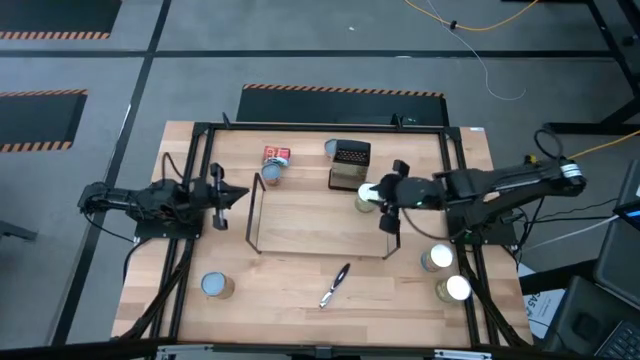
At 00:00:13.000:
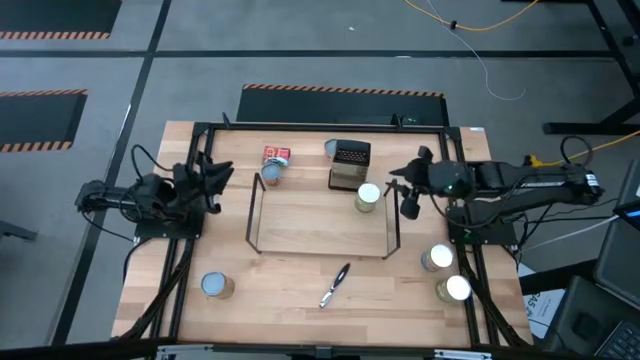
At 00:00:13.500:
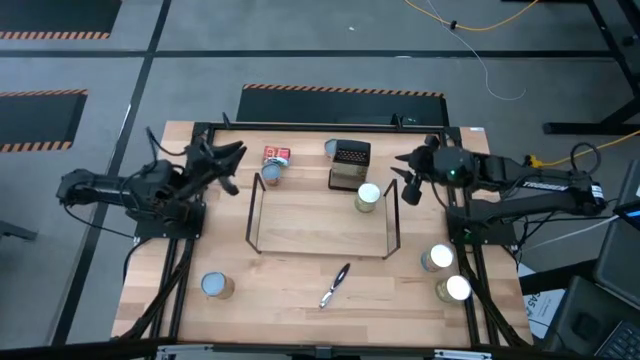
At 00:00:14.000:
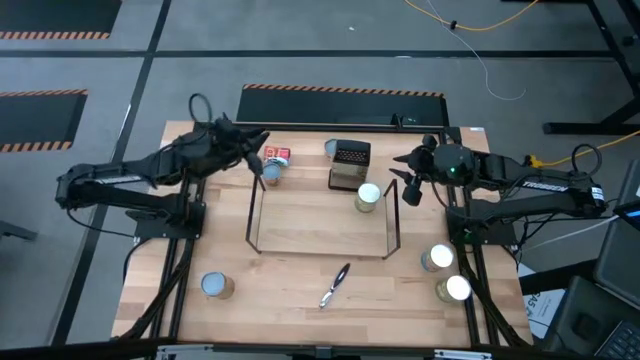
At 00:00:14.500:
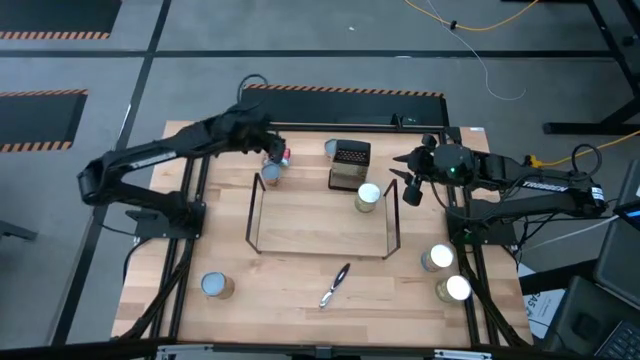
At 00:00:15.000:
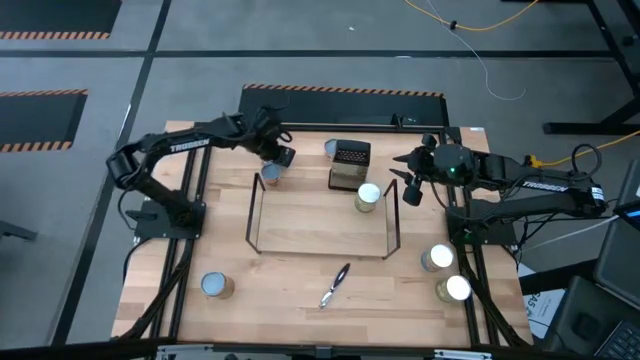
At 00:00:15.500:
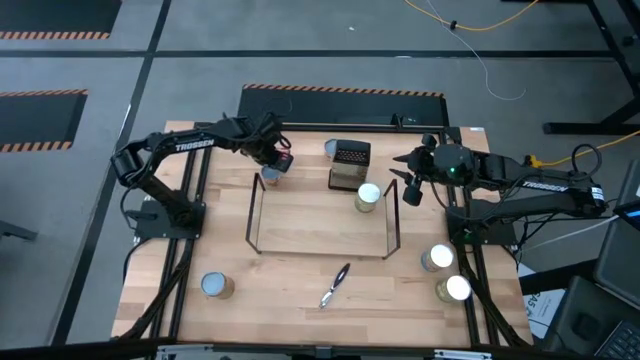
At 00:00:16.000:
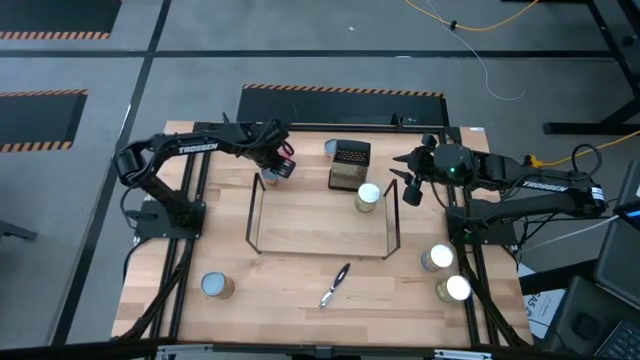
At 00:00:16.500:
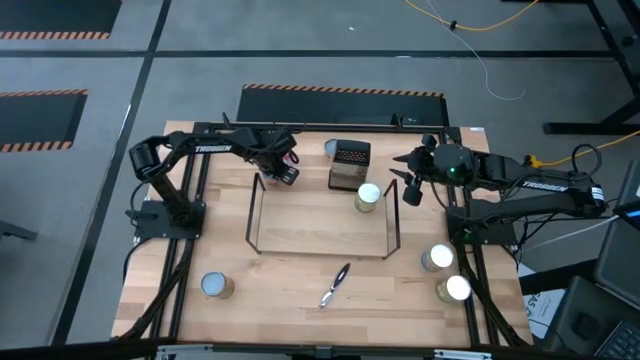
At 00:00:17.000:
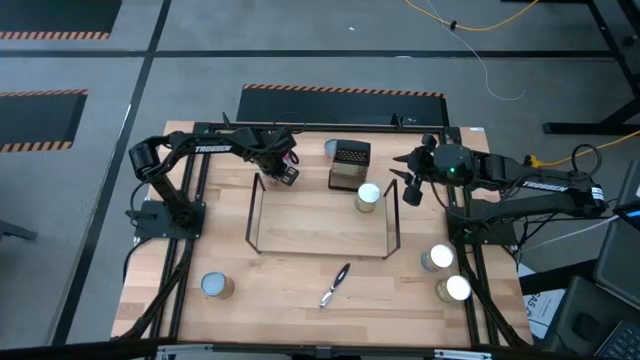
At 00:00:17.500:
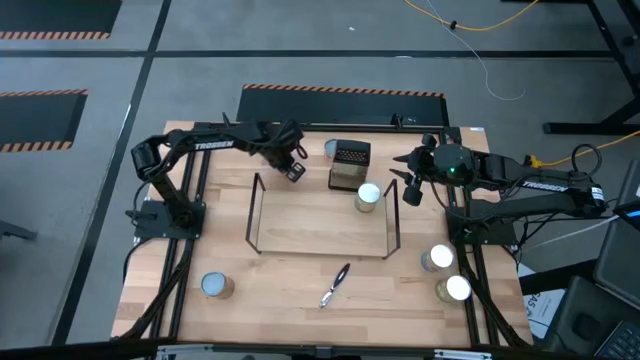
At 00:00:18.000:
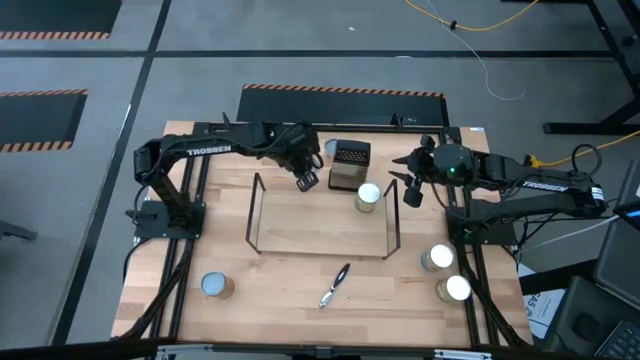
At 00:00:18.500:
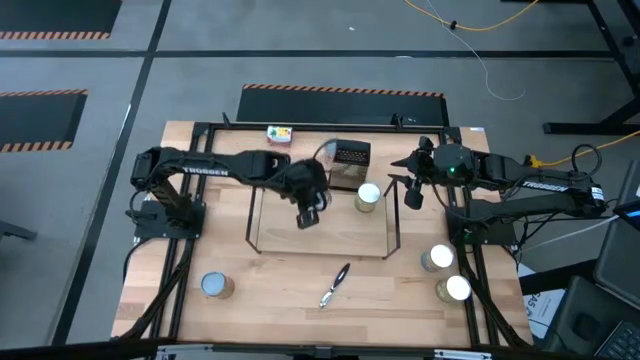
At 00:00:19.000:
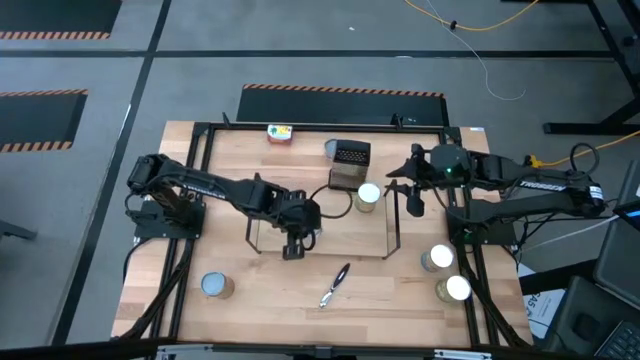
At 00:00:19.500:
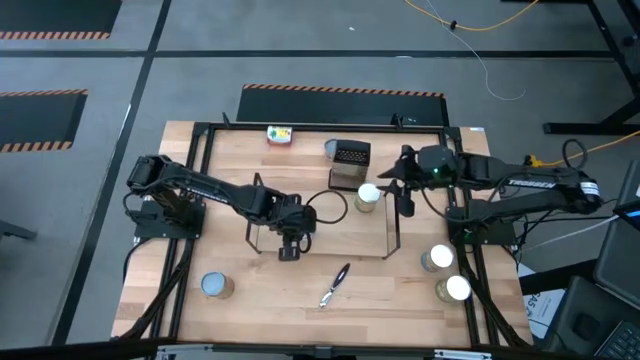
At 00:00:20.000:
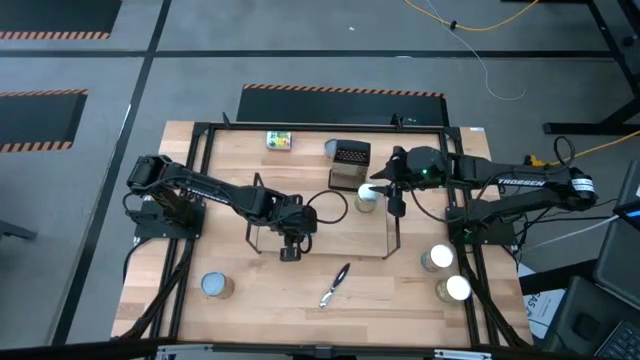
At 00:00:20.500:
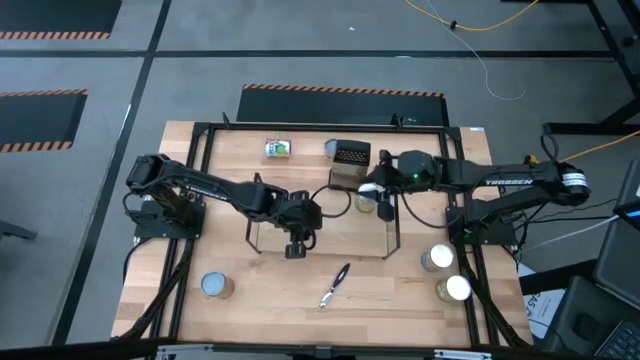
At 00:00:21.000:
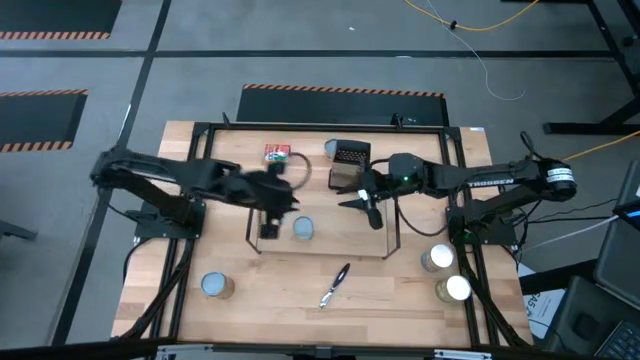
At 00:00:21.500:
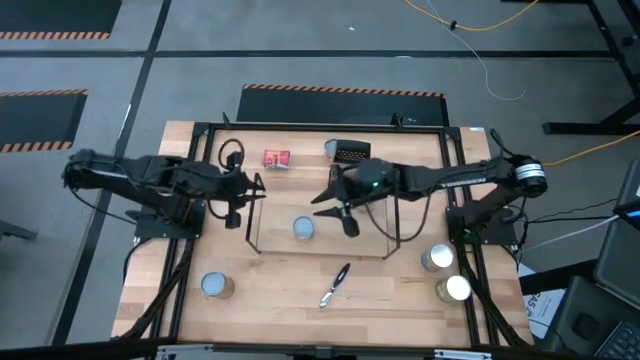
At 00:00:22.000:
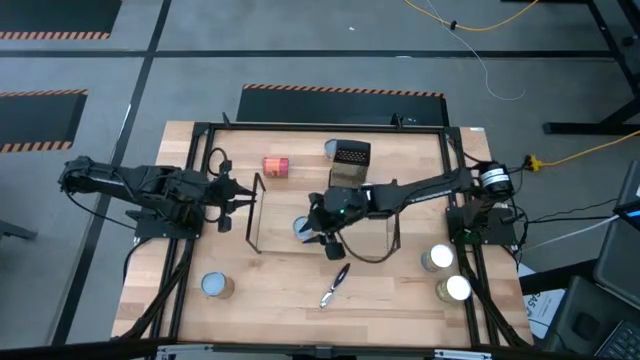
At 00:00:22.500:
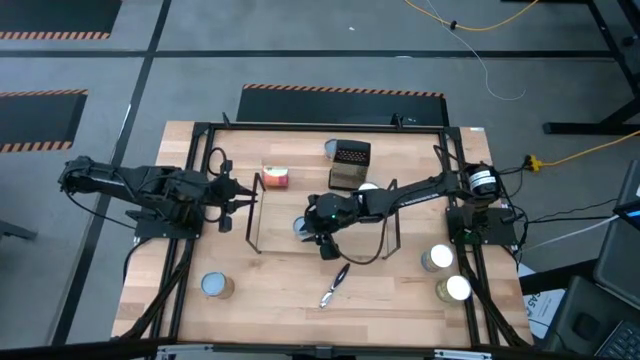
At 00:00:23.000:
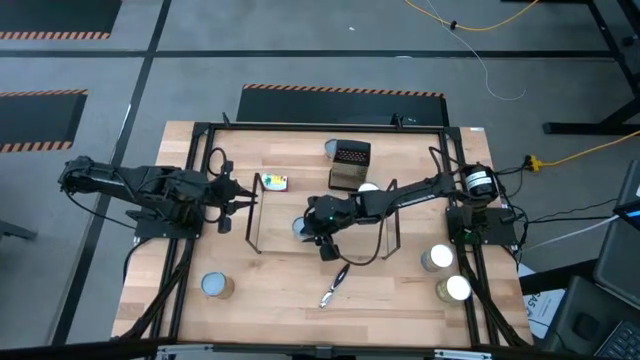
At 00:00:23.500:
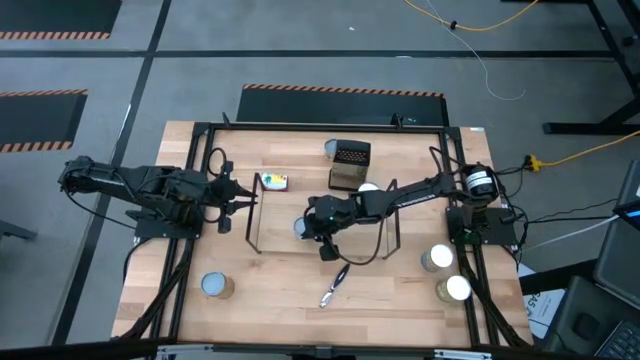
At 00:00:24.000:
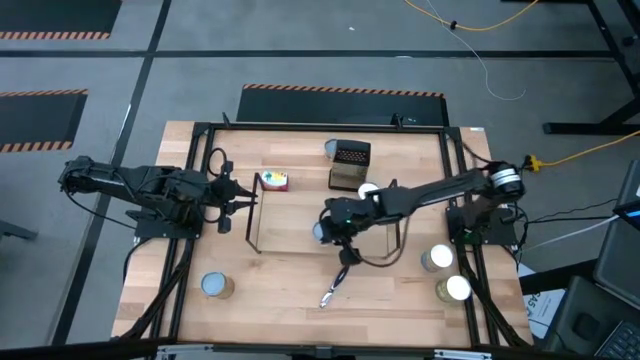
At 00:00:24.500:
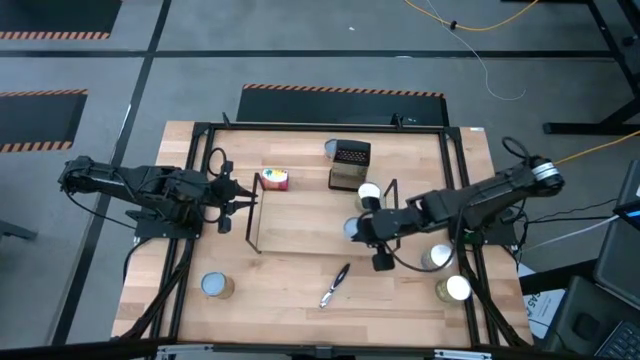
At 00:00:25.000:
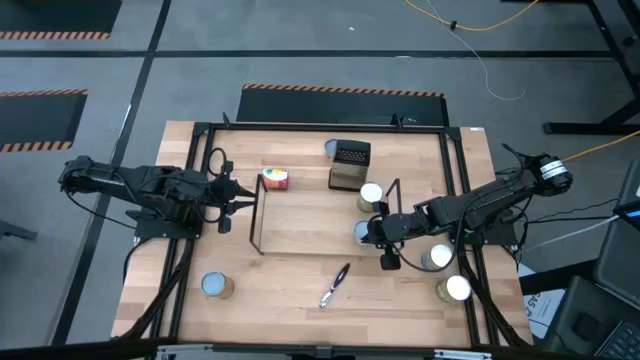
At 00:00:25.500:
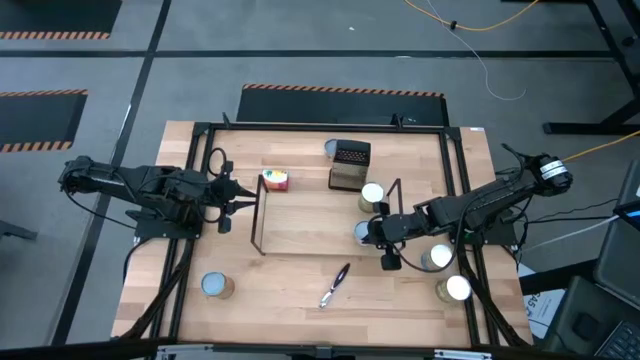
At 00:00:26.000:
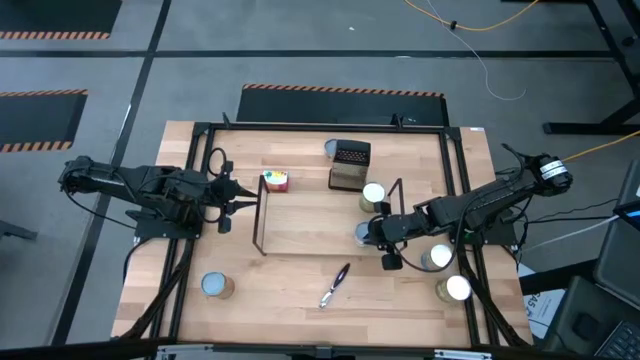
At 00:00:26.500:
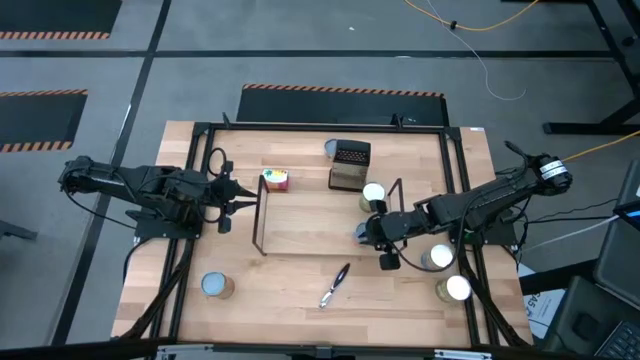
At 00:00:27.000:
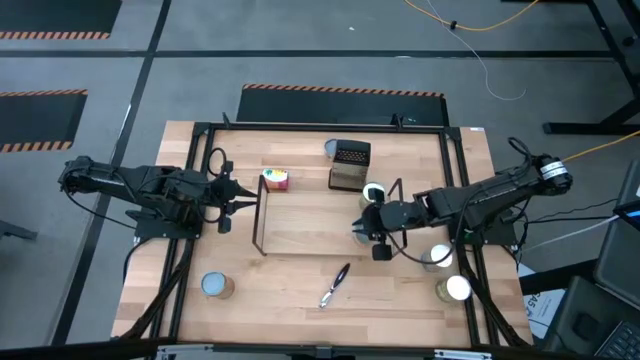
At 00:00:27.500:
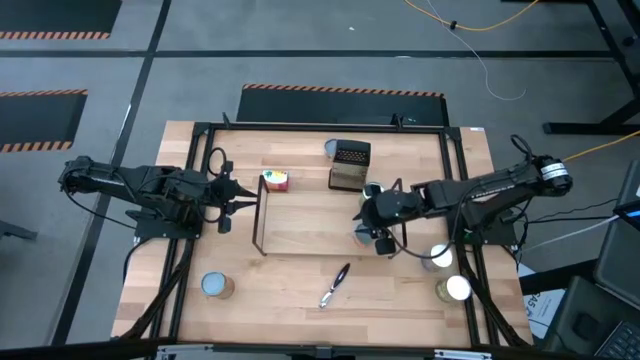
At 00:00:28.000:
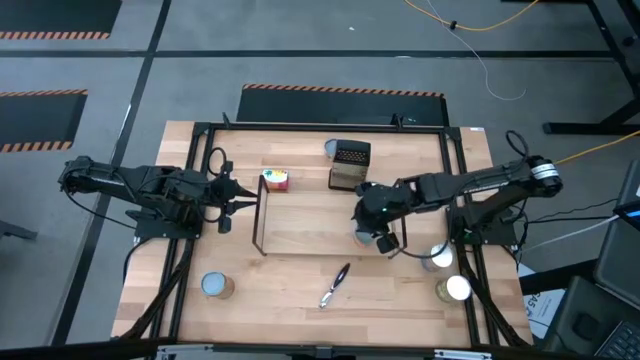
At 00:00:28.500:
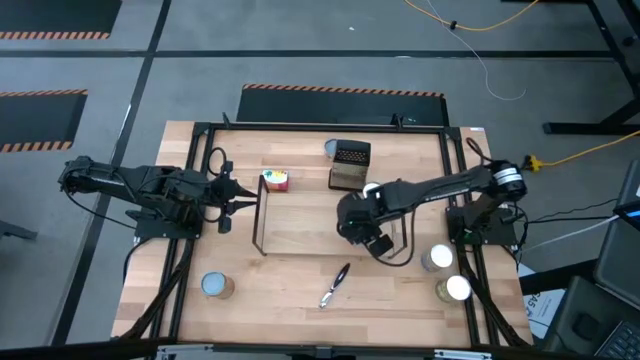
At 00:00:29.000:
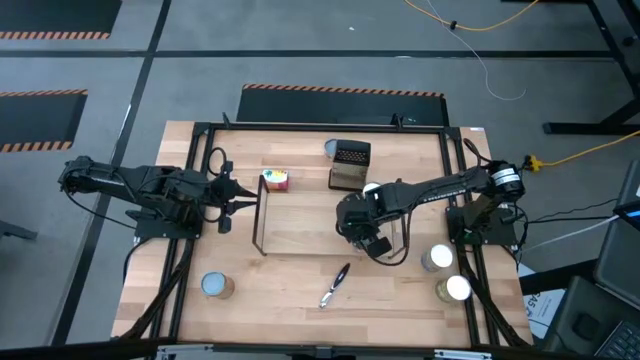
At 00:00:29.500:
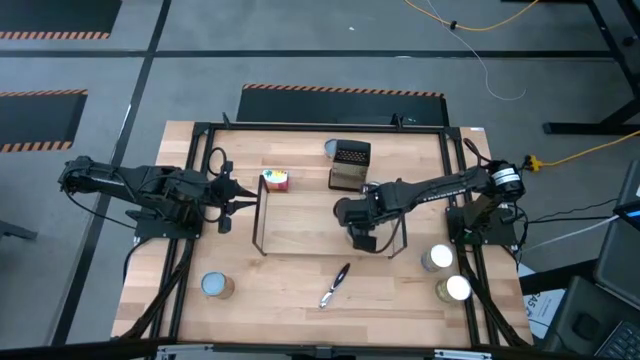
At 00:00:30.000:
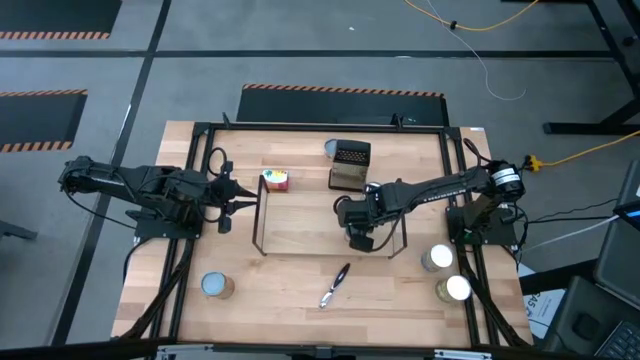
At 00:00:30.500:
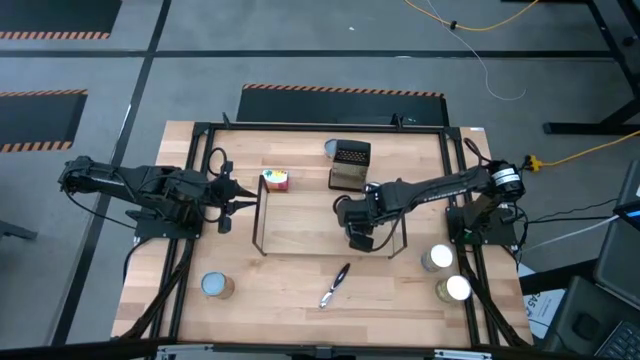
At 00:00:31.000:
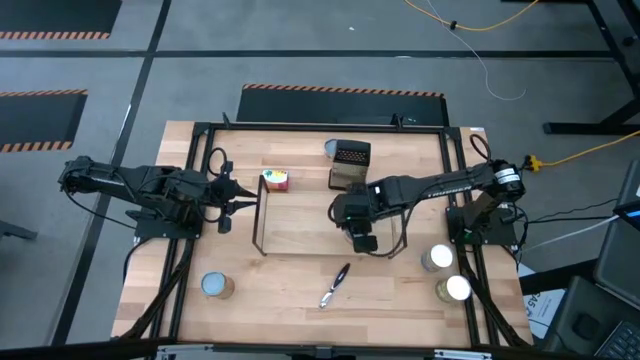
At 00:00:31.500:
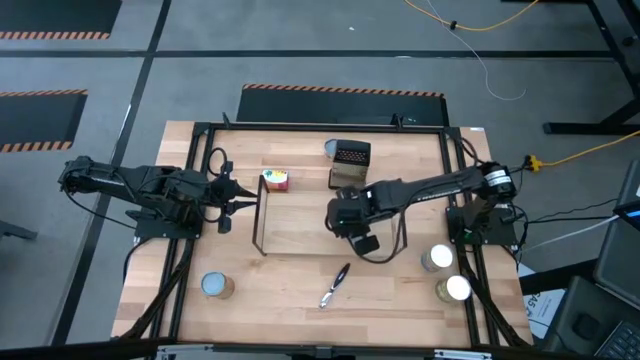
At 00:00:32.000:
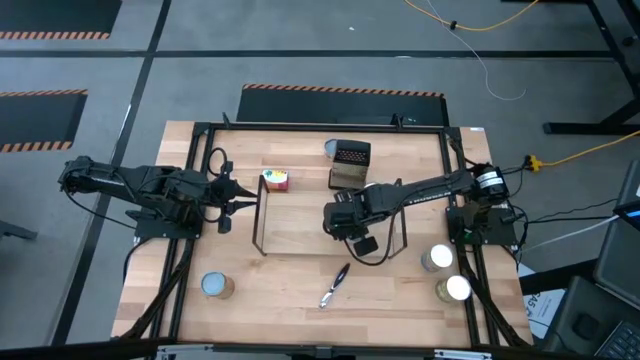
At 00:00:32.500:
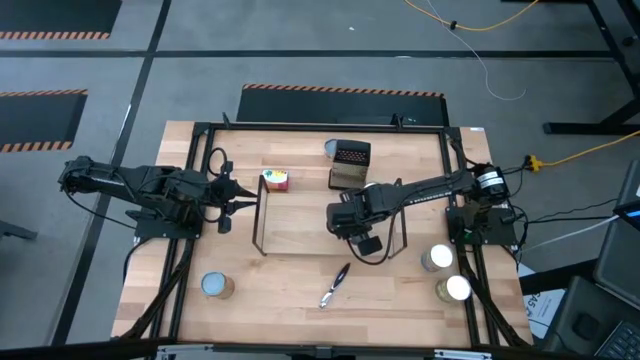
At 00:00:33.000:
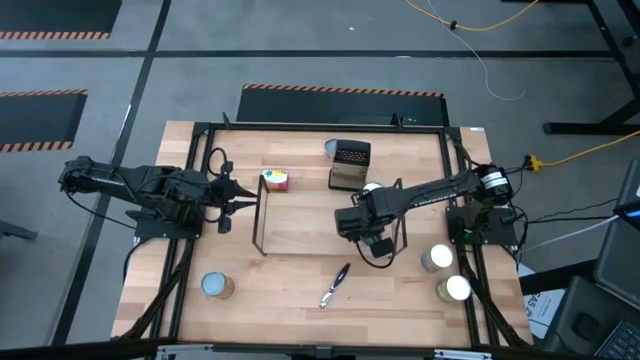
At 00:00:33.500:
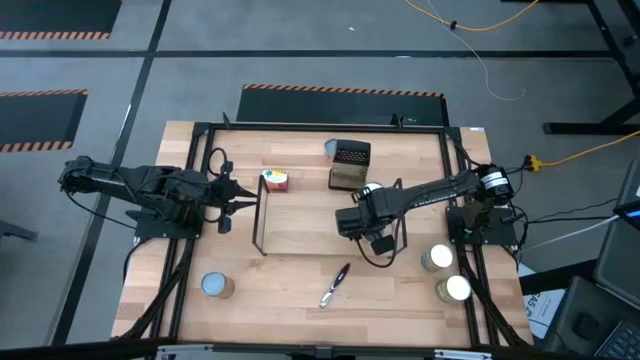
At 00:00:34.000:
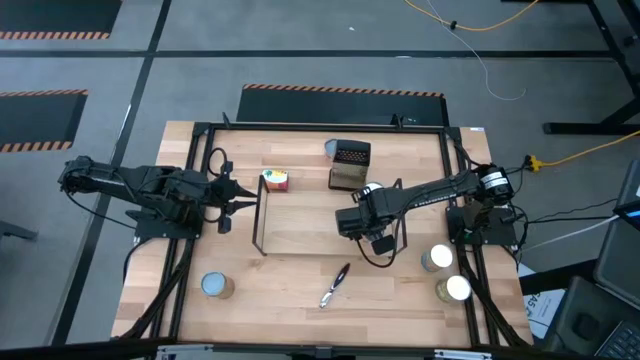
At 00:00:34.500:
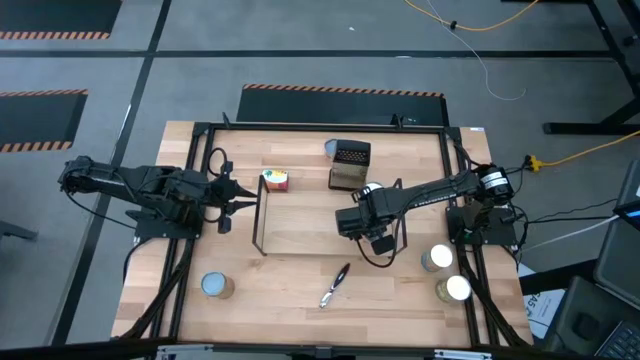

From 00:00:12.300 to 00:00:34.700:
Task: Pick and place cans onto a shelf
Put the canned mandarin oranges on the shelf
